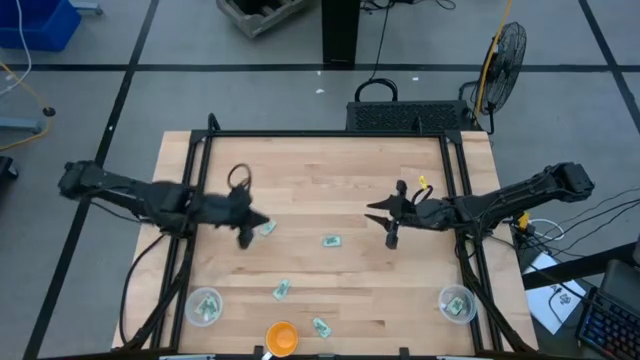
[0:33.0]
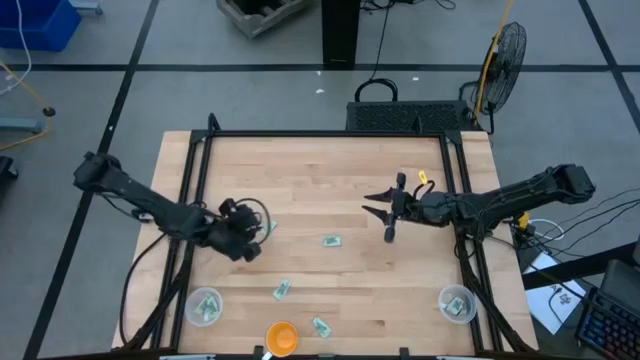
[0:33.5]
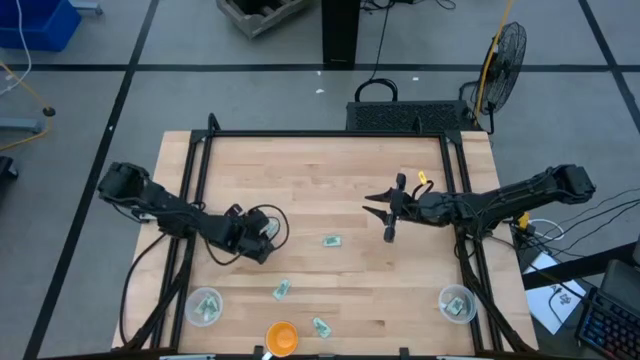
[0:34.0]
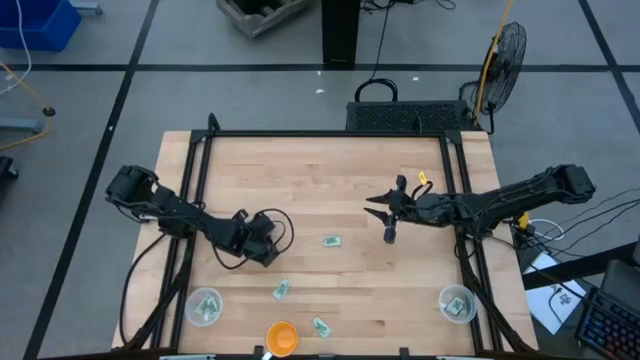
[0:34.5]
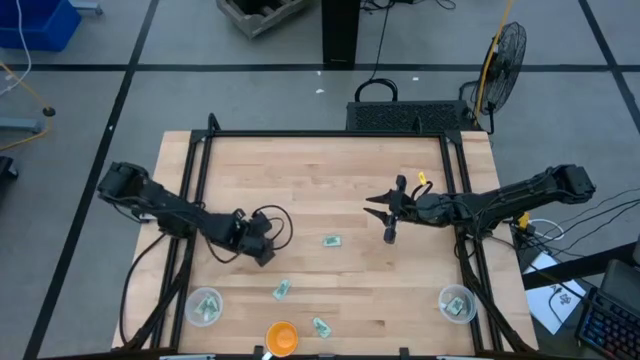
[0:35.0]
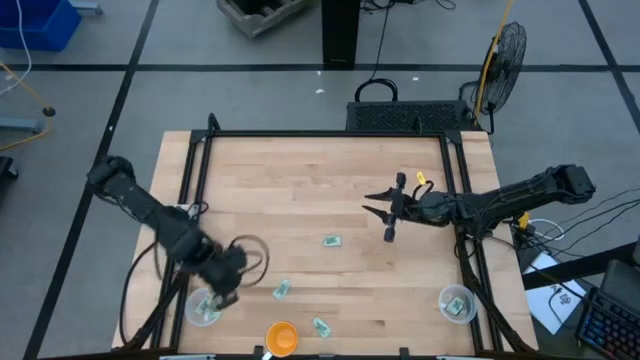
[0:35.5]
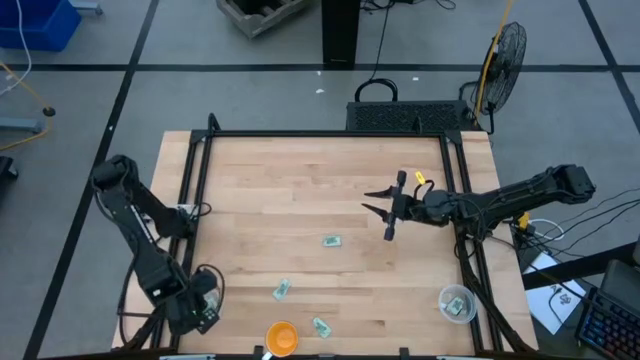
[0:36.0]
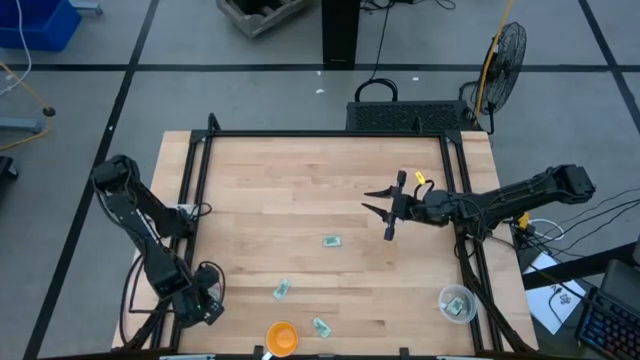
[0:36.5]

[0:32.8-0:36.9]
Task: Pick and place Stevia / Truvia into bins
Put the stevia packet into the left transparent container

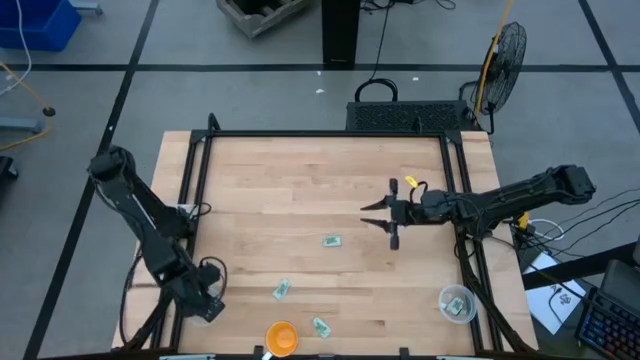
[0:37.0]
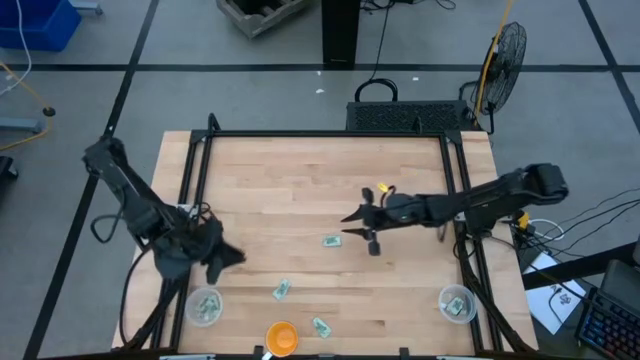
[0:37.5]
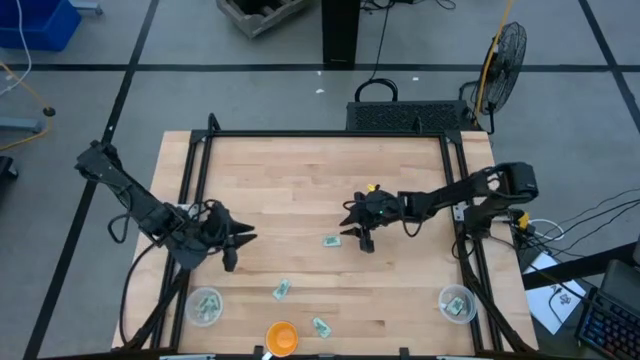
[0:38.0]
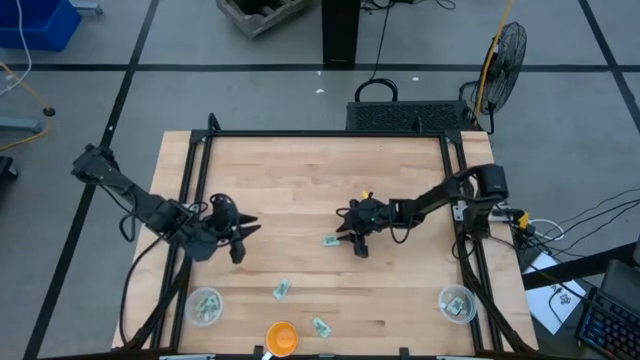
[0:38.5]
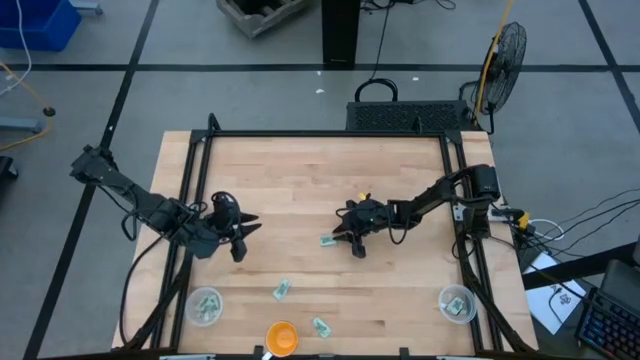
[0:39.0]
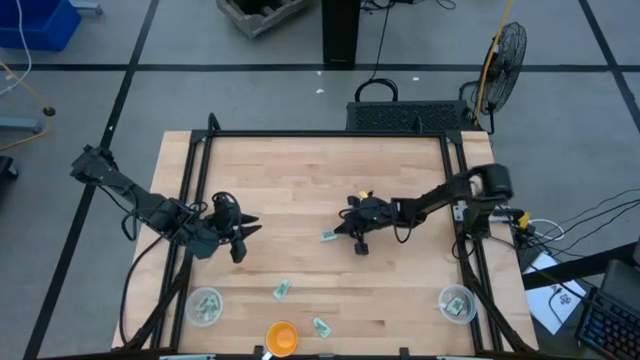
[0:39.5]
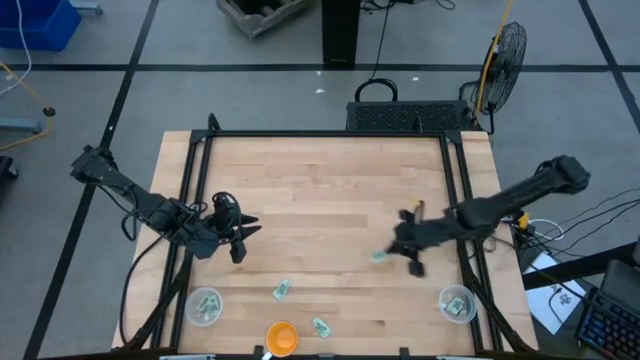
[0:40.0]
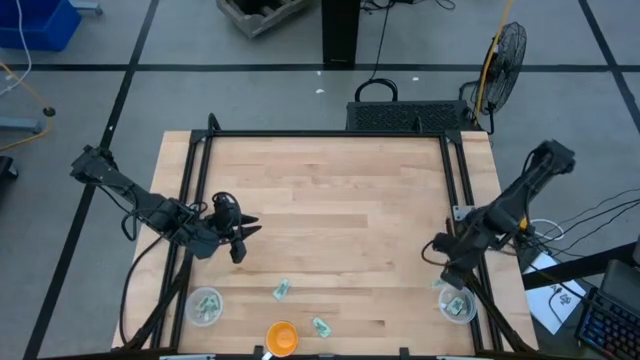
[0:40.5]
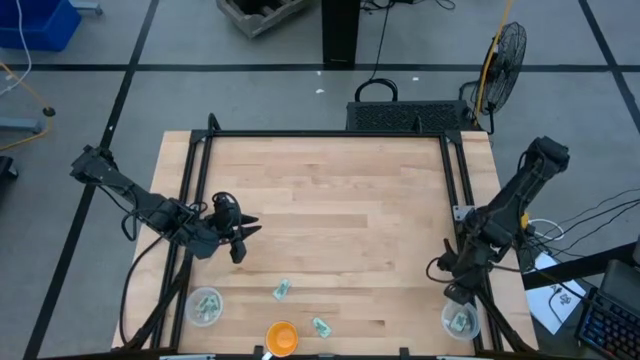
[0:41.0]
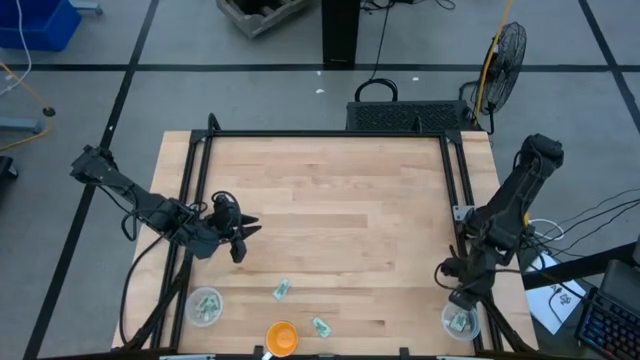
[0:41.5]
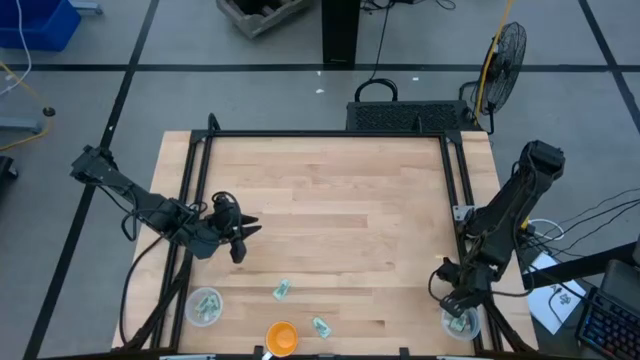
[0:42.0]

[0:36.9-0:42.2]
Put the stevia packet into the right transparent container

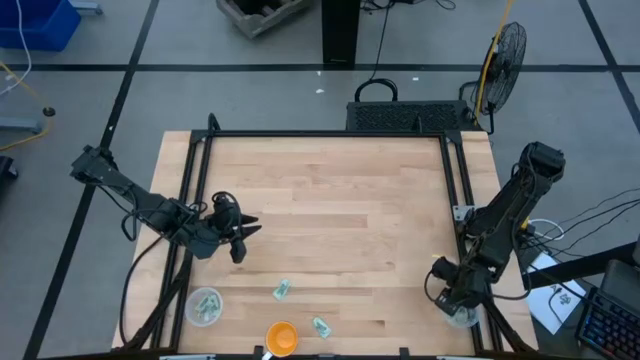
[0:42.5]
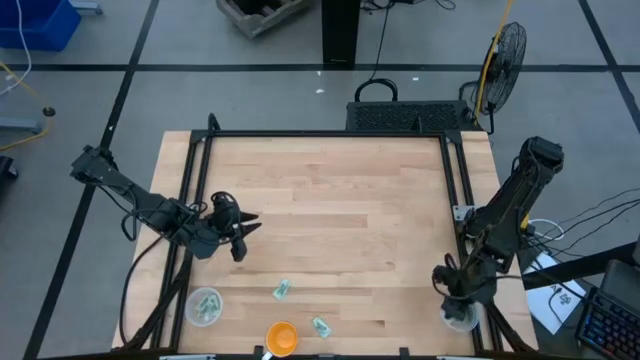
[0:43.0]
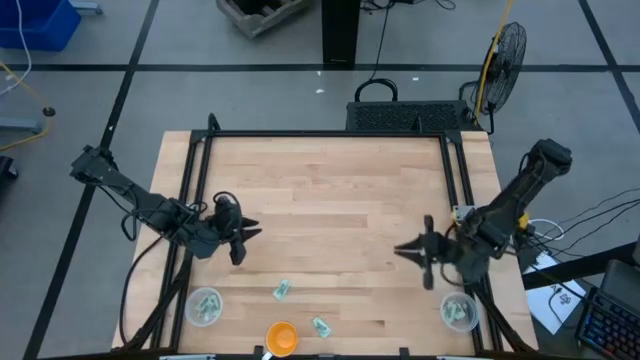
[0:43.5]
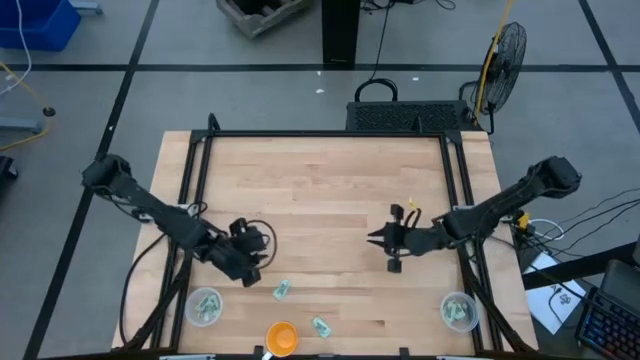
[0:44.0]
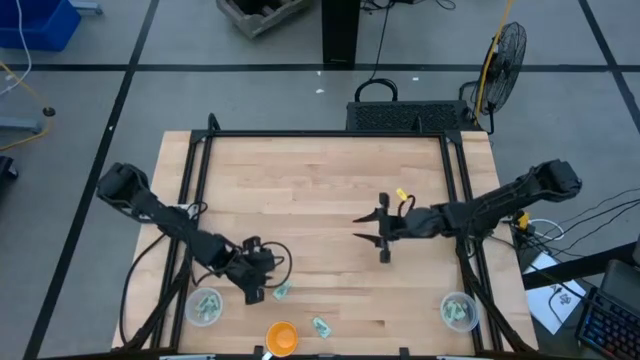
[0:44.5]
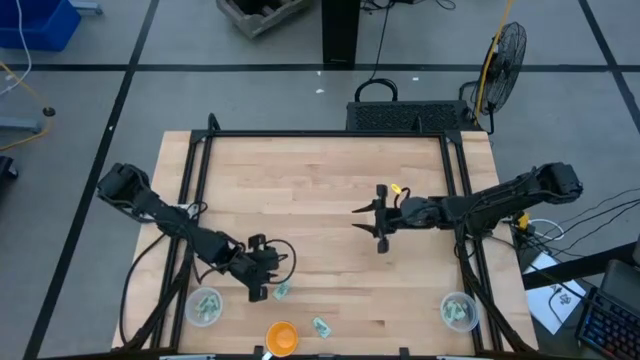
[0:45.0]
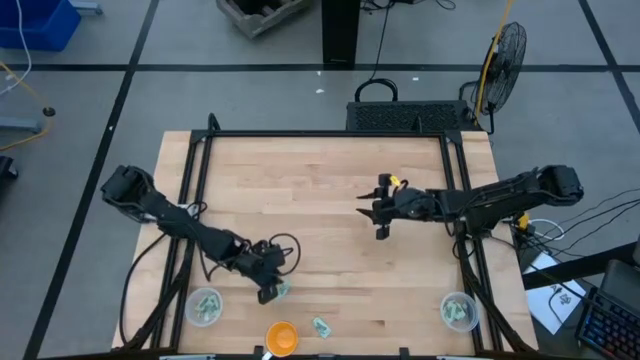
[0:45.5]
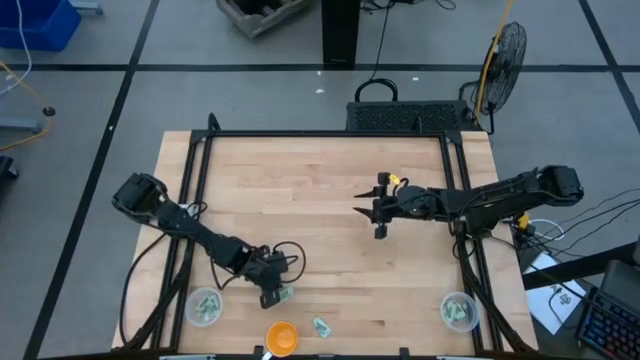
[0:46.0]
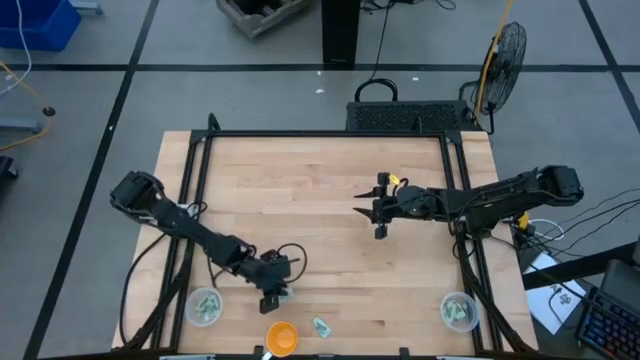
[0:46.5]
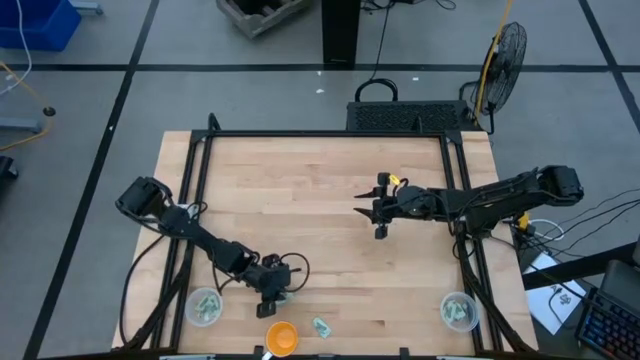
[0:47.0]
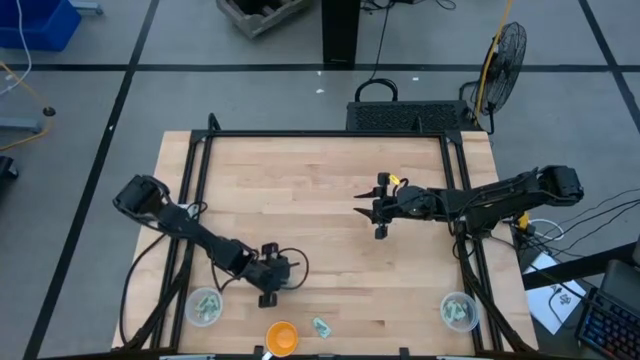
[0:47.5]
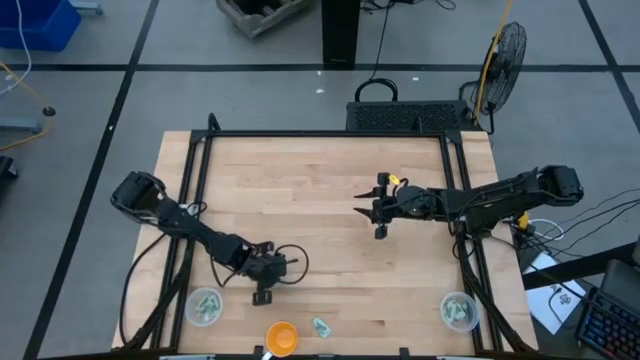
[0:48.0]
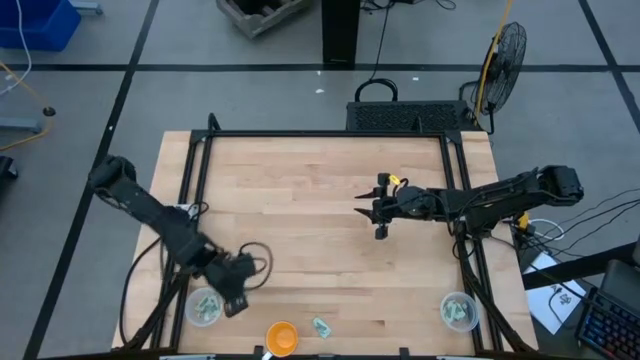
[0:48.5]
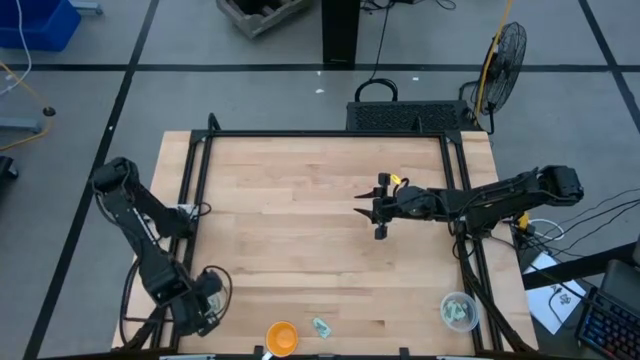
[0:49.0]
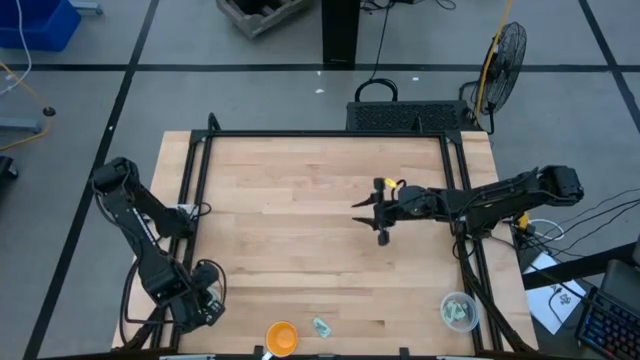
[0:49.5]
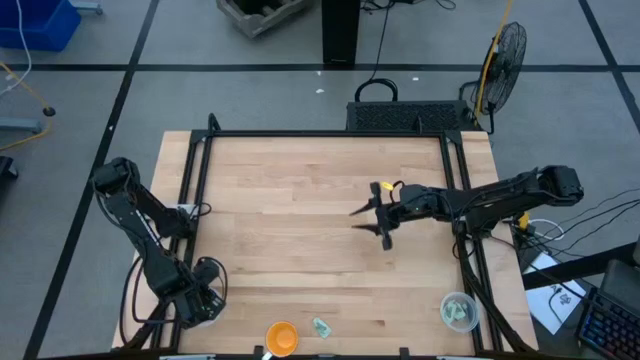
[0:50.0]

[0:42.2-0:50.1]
Put the stevia packet into the left transparent container

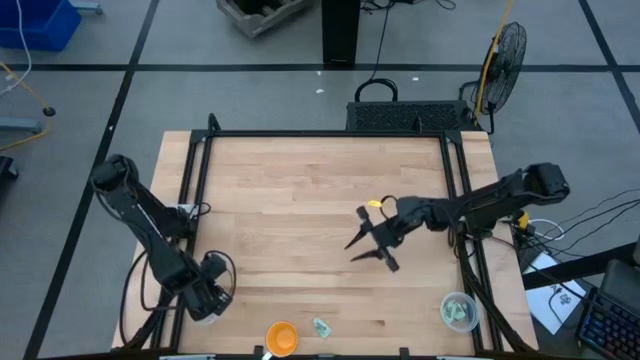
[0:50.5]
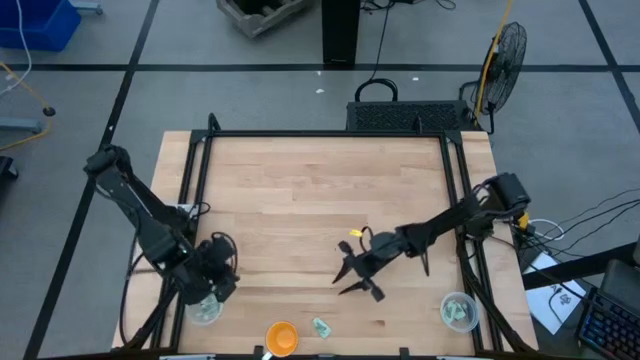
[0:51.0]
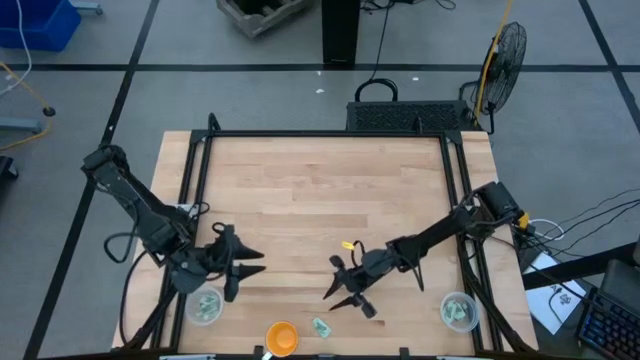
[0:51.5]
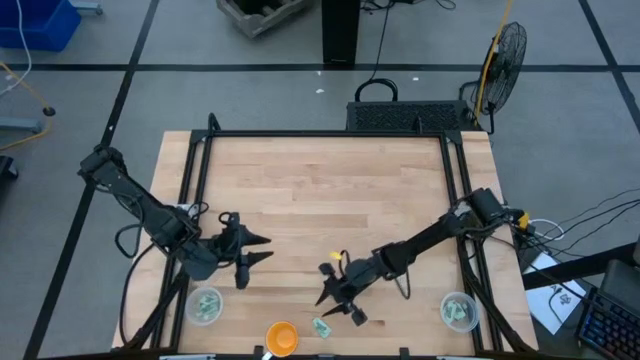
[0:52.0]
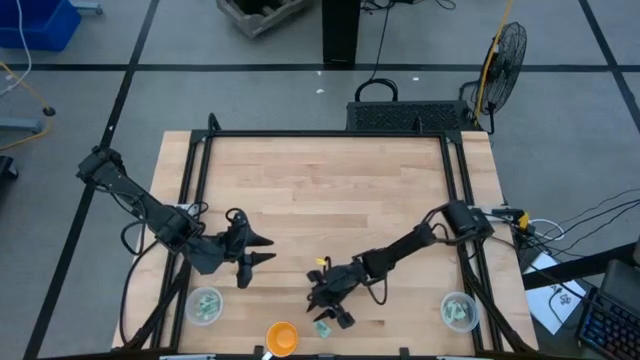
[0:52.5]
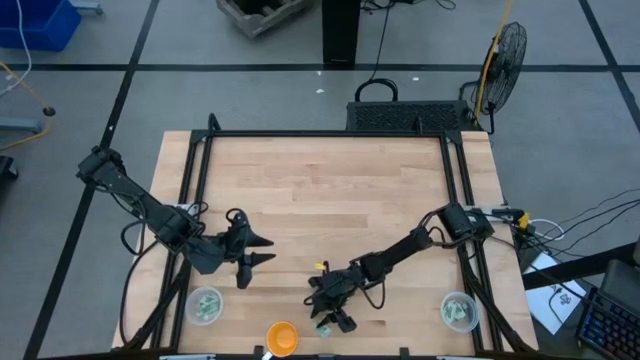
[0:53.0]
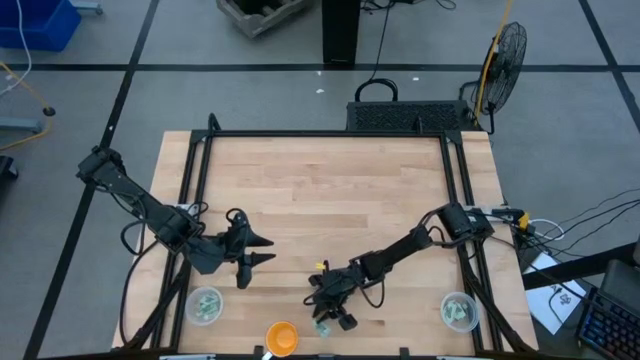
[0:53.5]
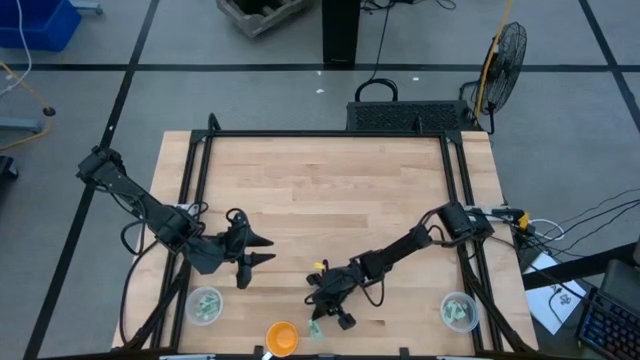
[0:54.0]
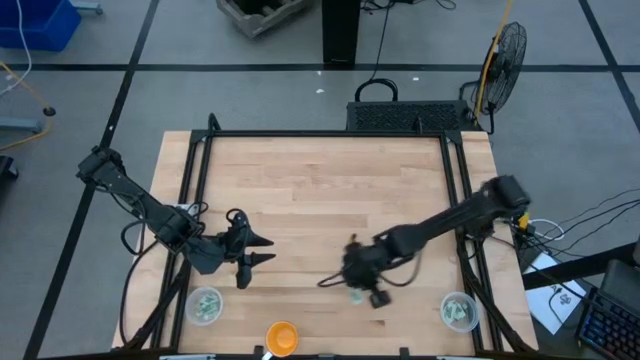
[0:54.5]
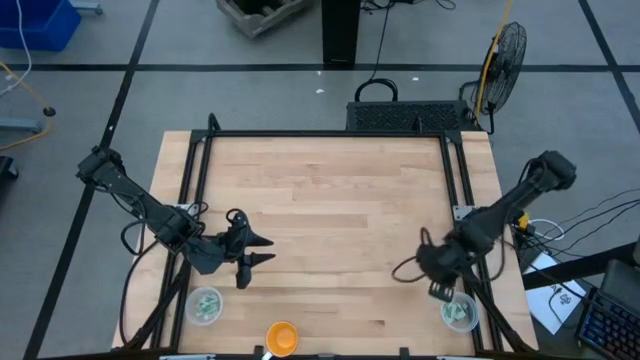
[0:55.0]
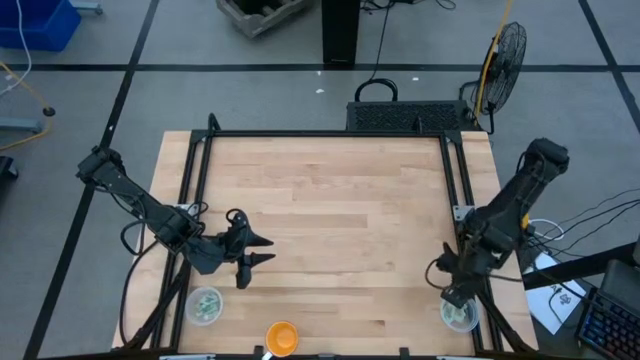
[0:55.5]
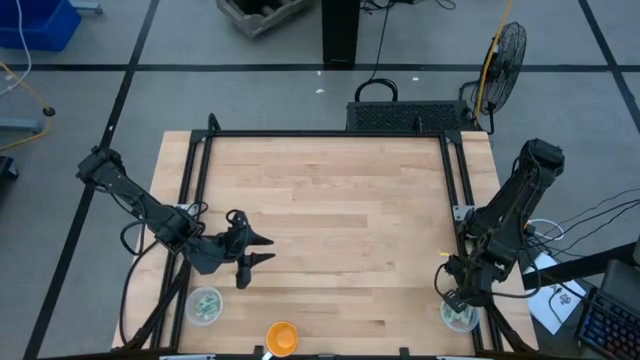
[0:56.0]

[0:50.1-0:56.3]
Put the stevia packet into the right transparent container
